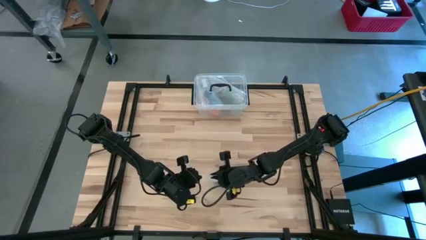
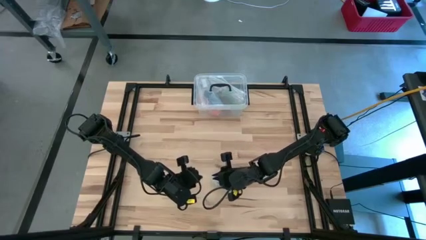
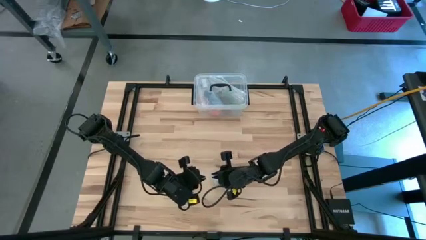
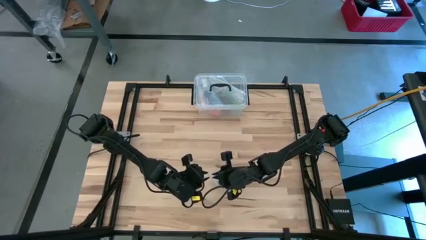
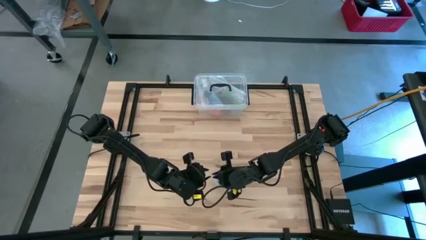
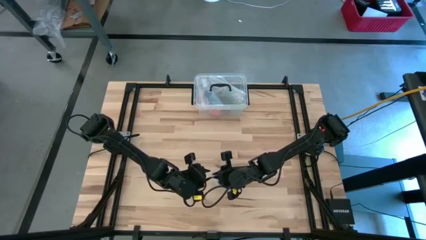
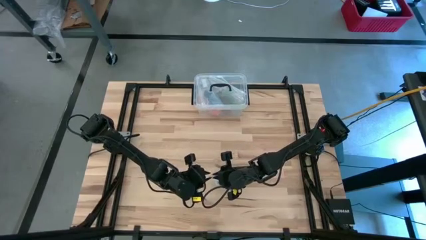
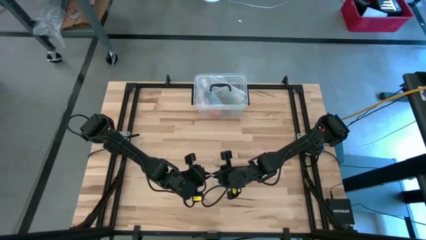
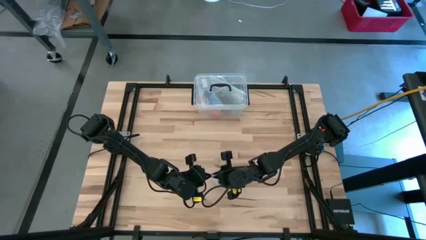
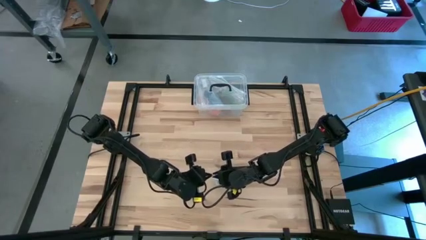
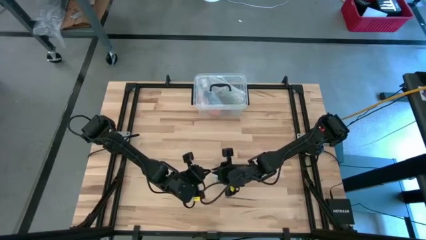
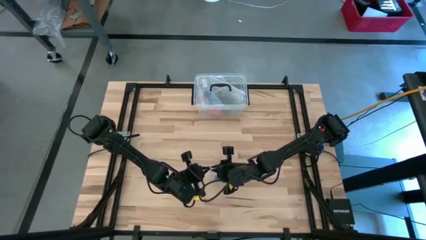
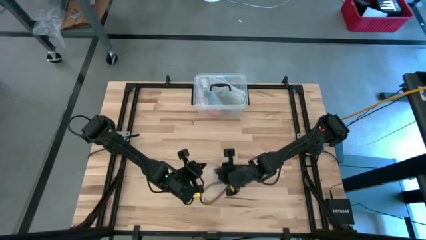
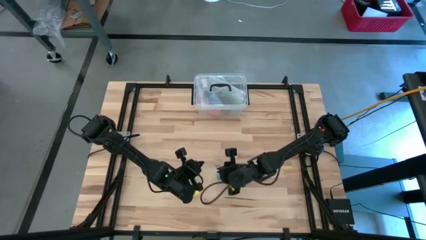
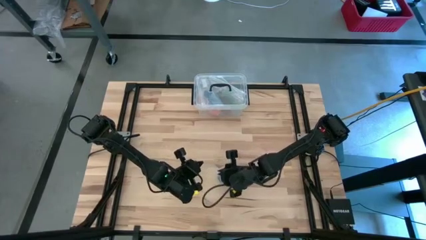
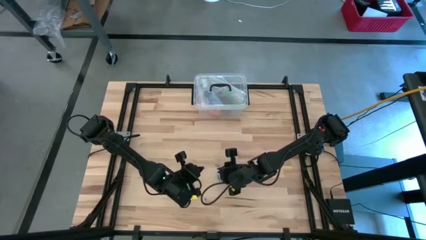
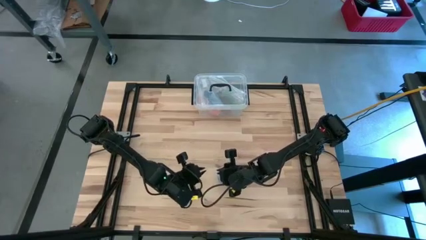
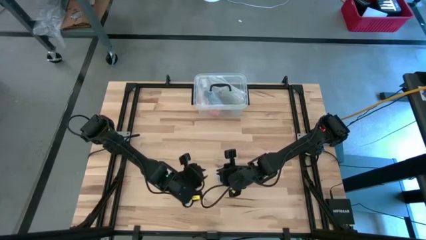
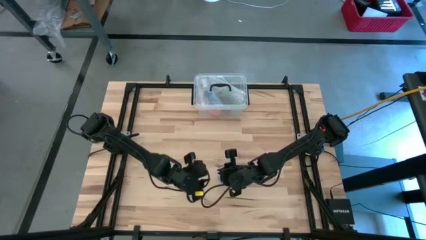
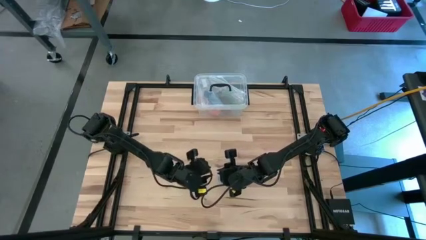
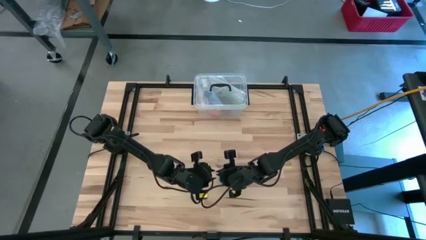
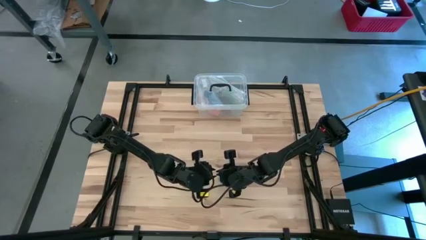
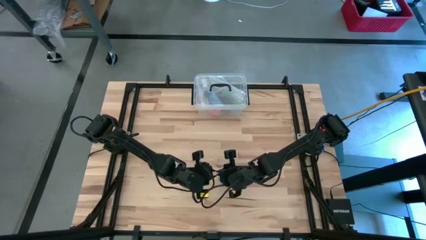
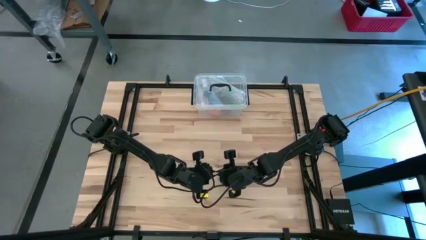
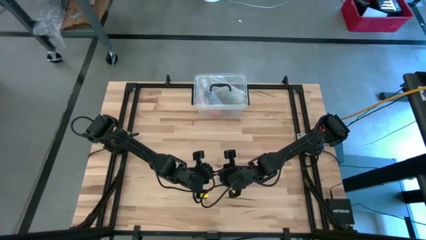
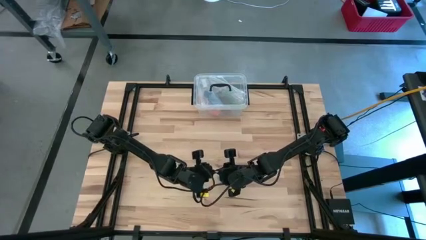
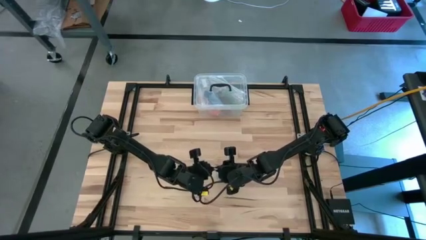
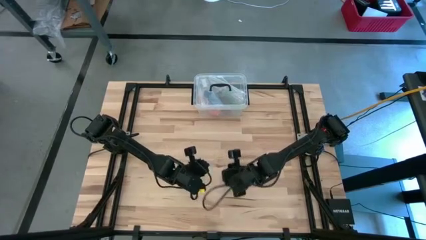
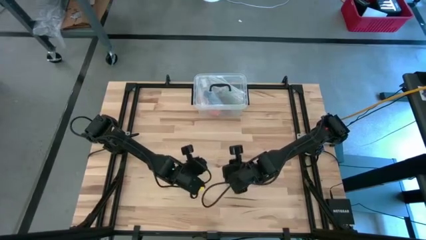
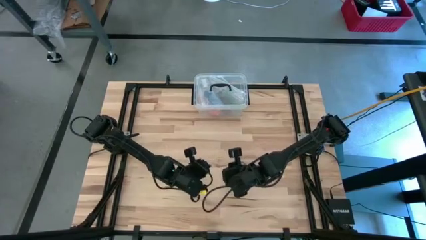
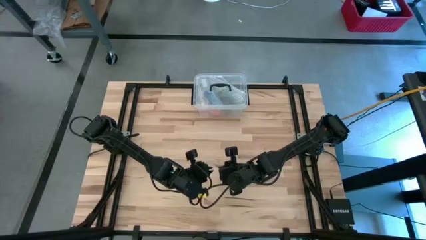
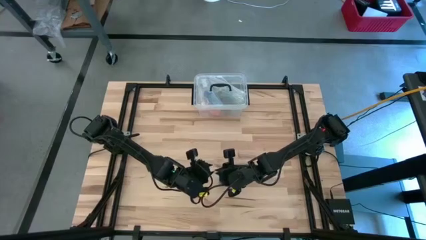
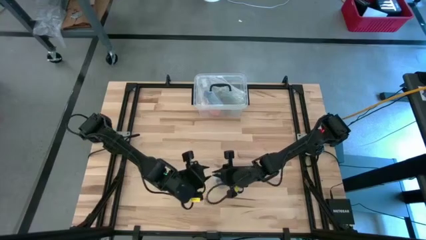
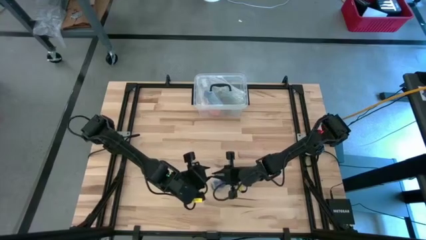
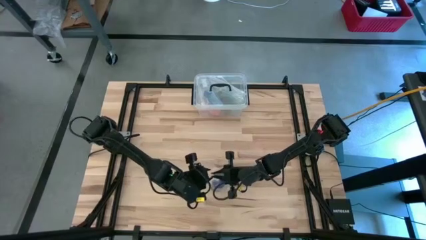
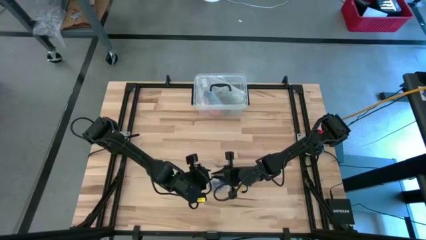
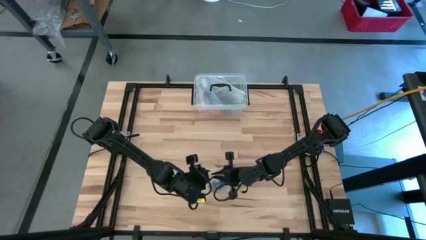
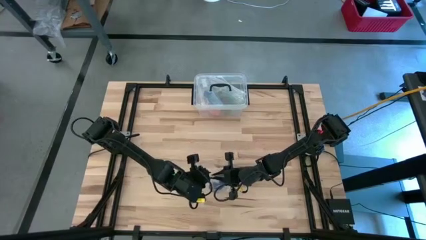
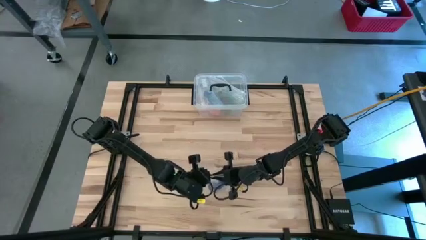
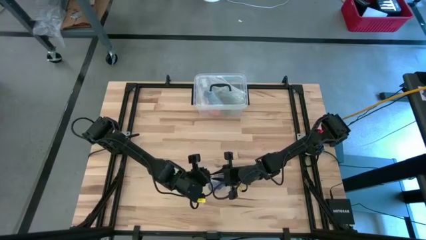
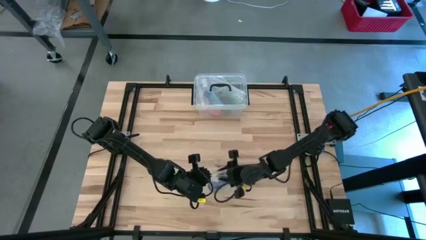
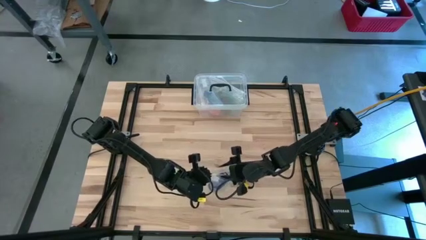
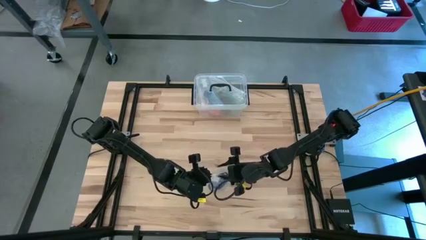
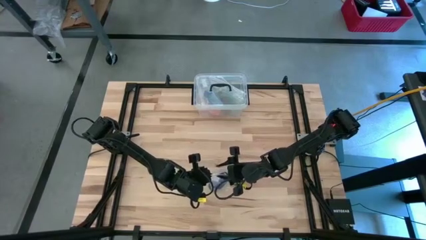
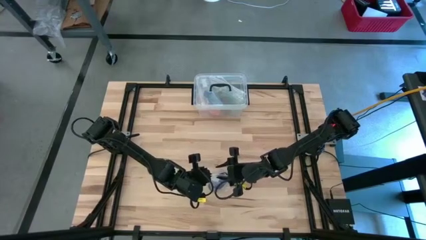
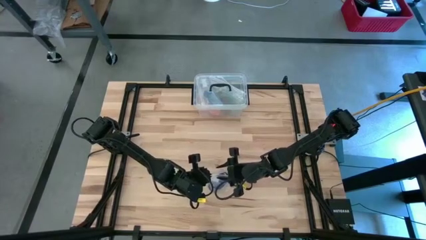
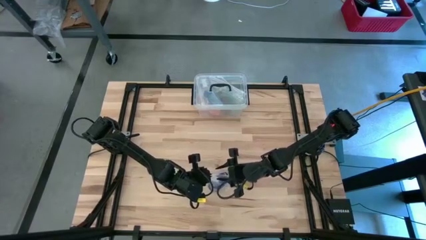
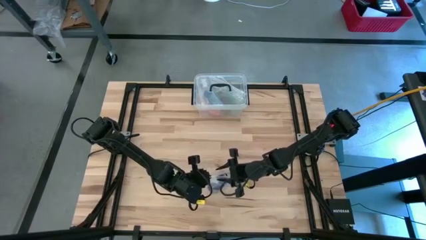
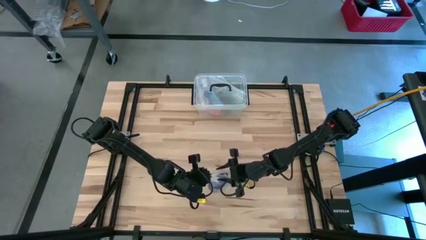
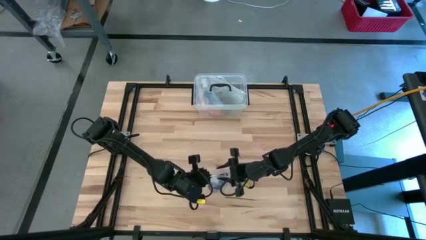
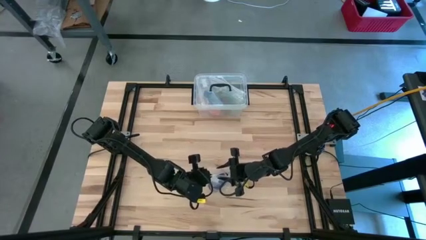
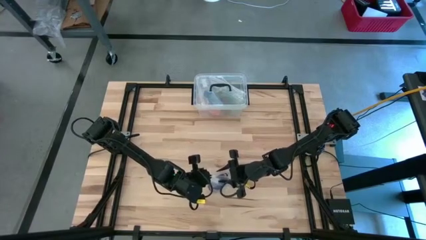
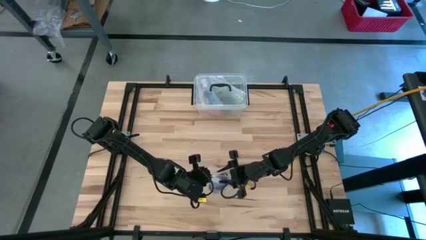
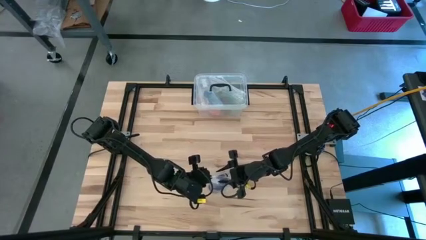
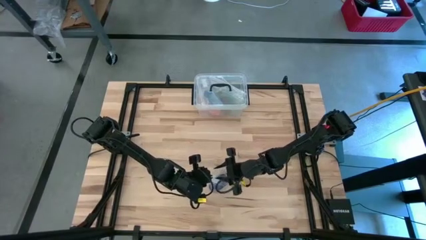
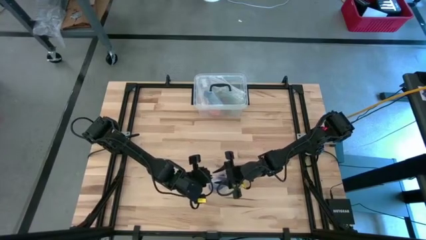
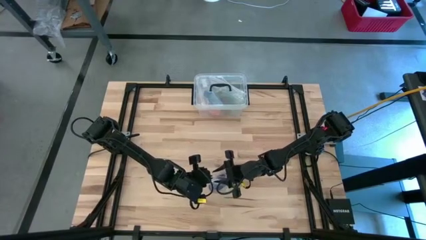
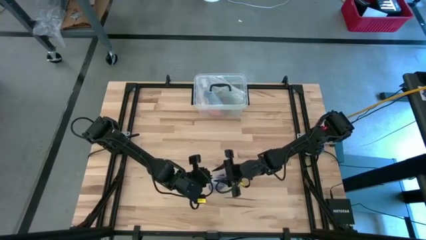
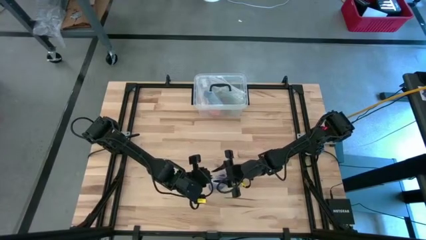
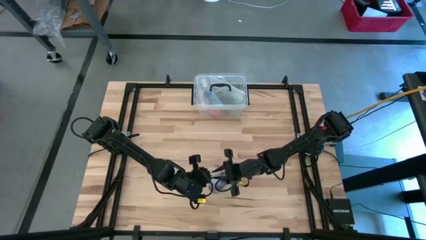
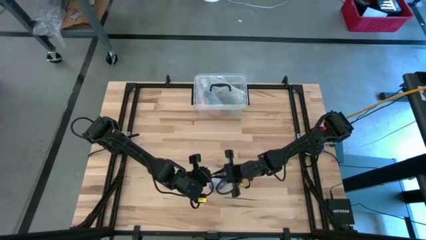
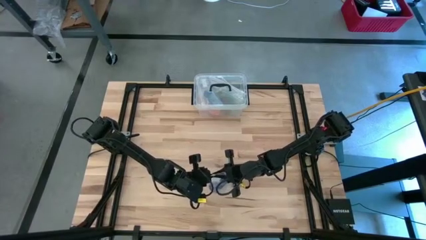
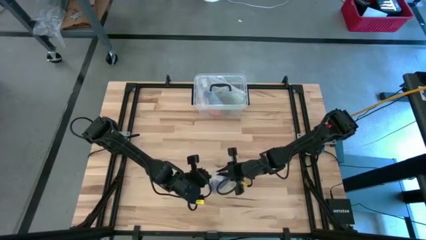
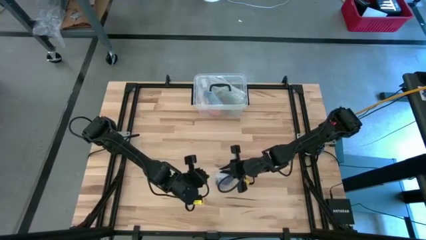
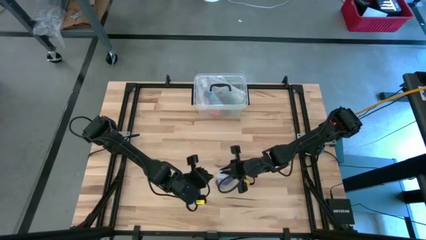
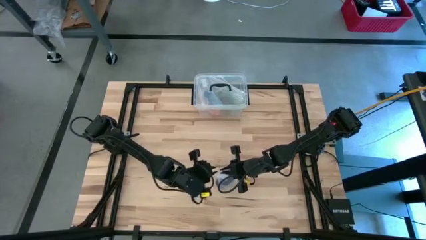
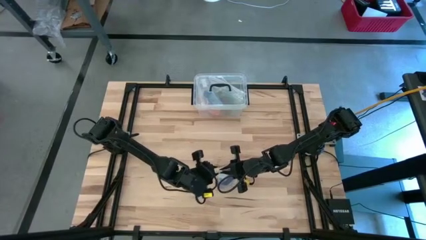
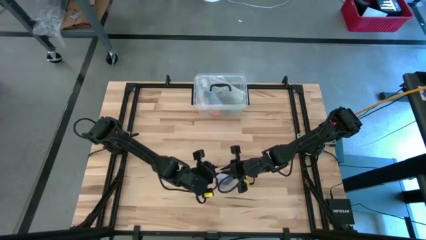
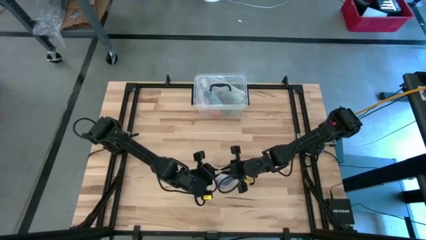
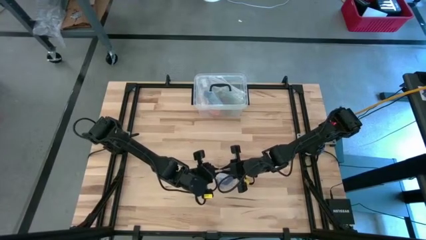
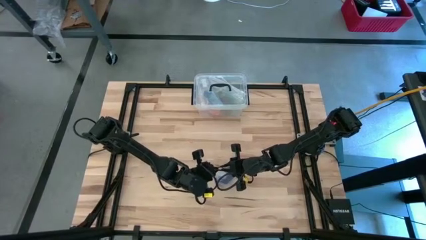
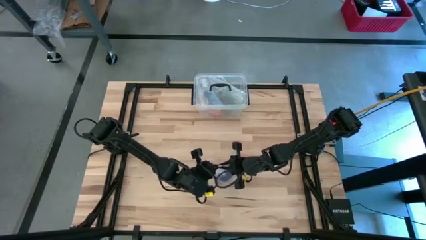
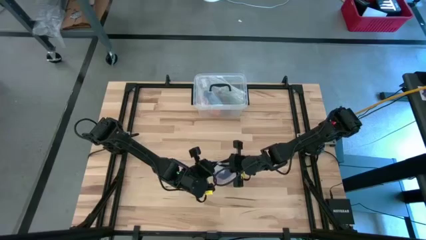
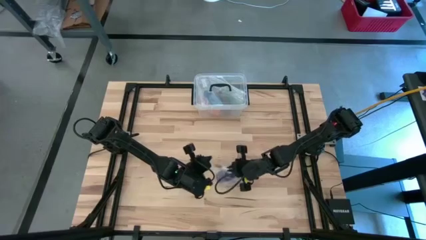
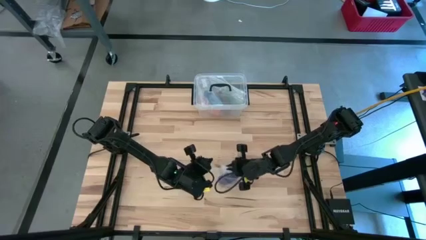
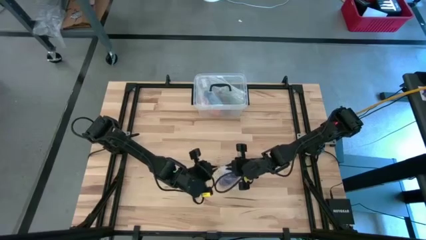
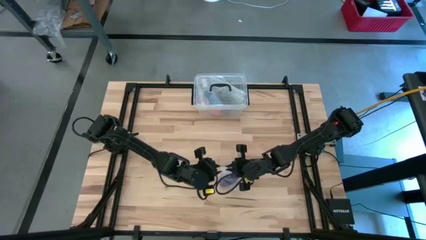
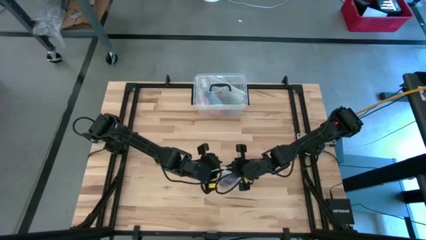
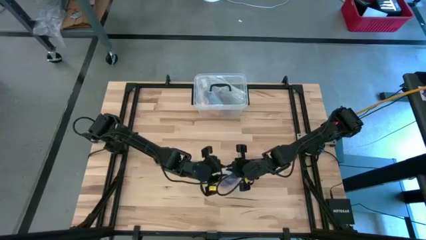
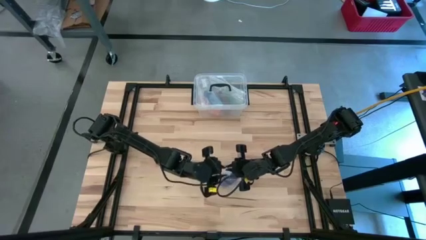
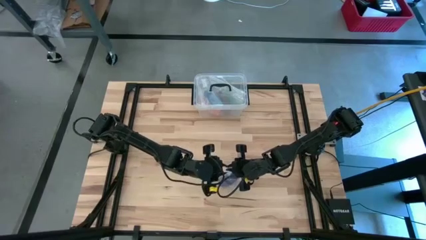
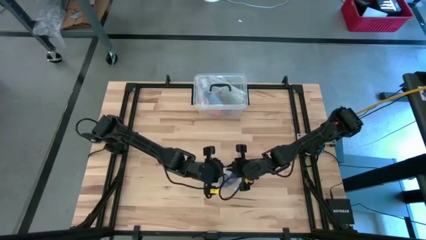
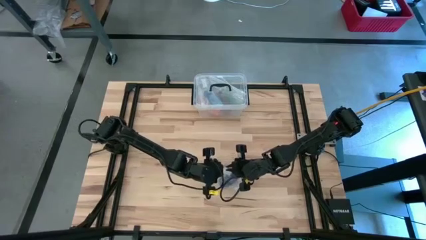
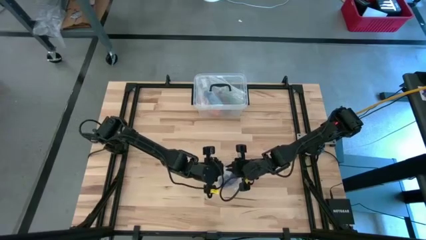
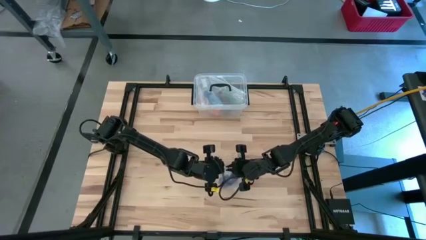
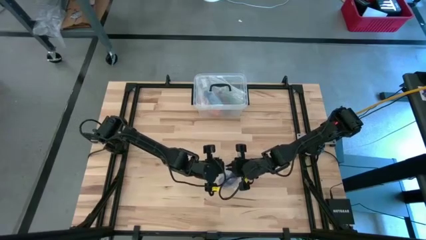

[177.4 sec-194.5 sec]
Task: Roll bandage
Close the transparent zip bag

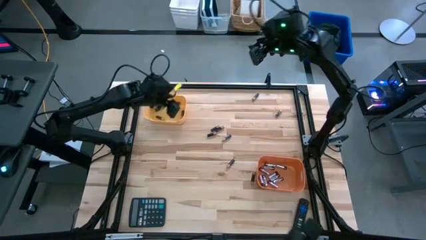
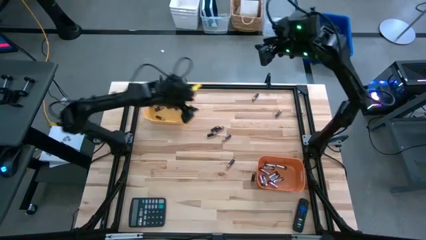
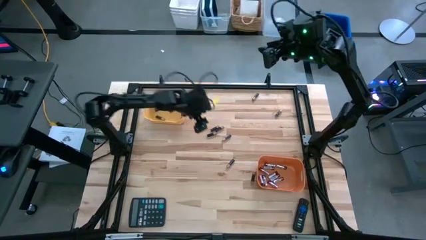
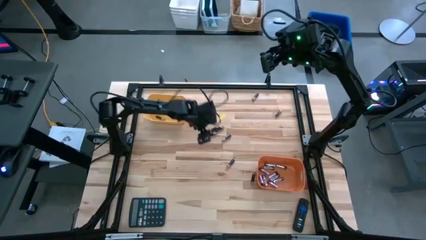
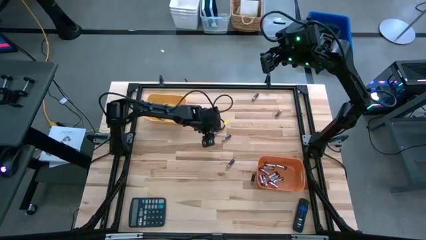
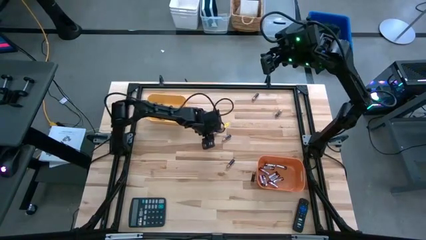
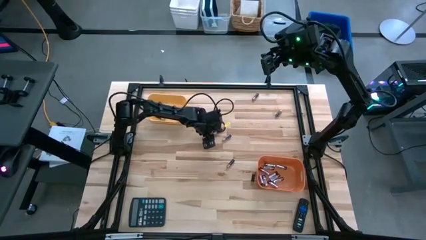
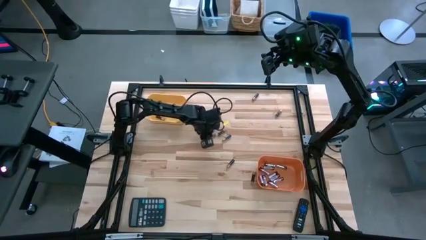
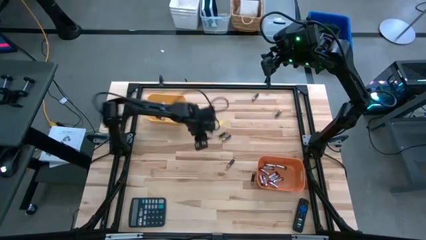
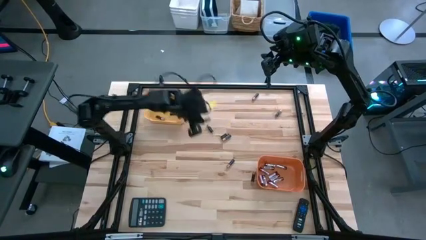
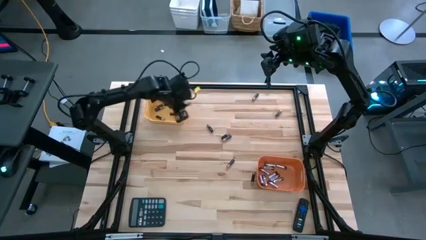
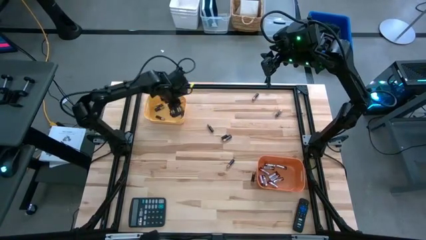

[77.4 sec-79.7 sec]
Task: Sort batteries
Put the black battery into the yellow bin
